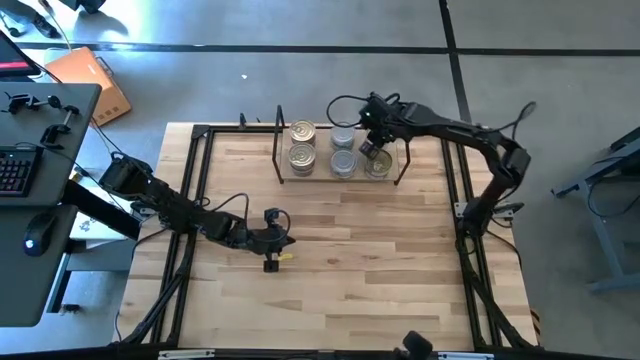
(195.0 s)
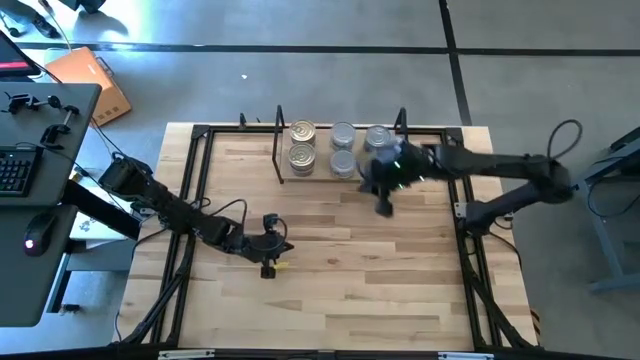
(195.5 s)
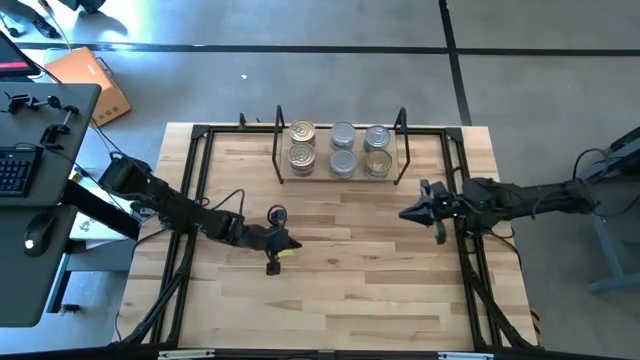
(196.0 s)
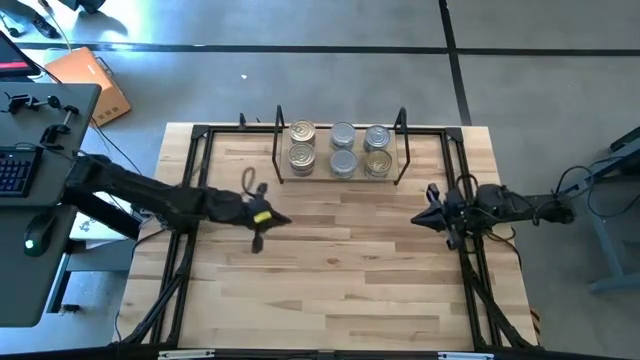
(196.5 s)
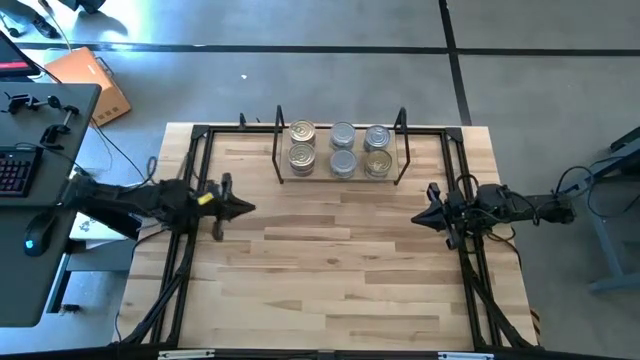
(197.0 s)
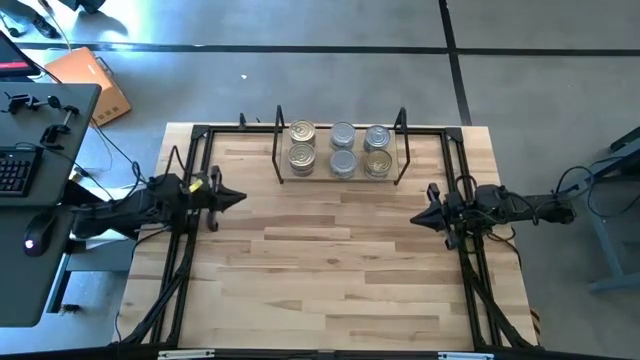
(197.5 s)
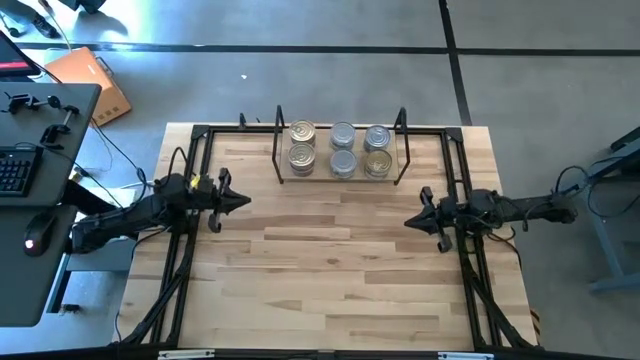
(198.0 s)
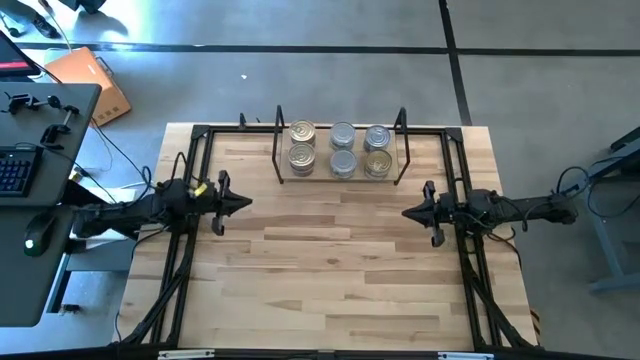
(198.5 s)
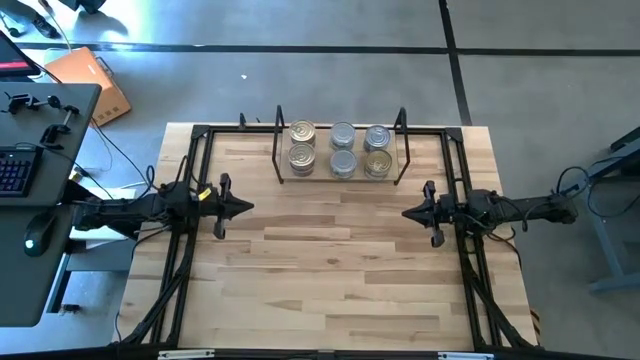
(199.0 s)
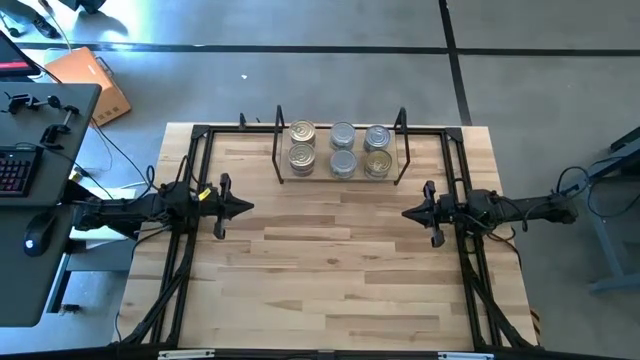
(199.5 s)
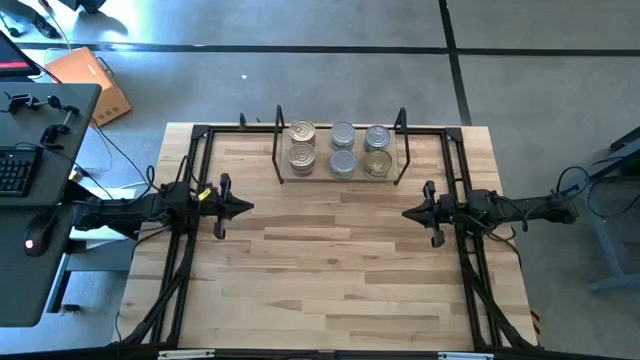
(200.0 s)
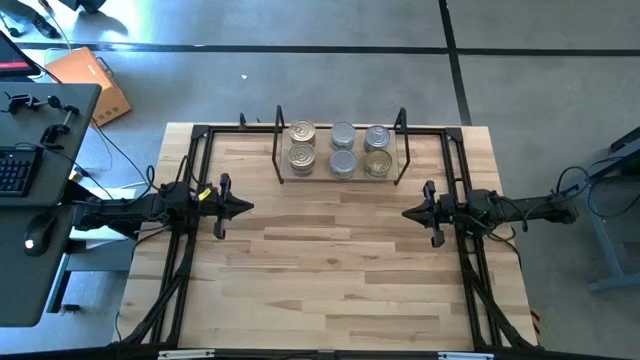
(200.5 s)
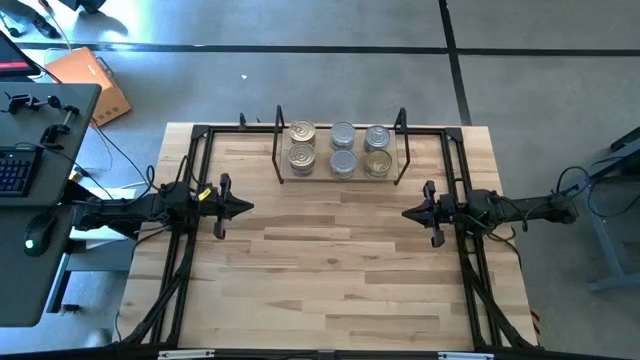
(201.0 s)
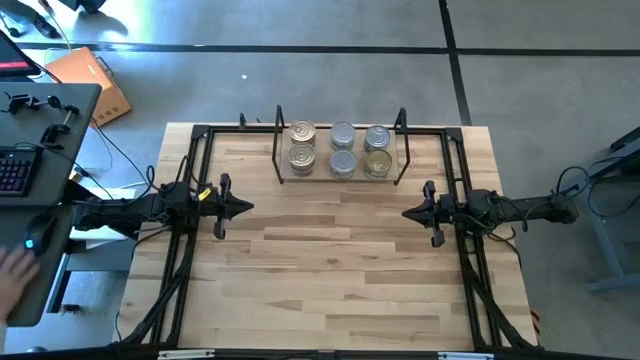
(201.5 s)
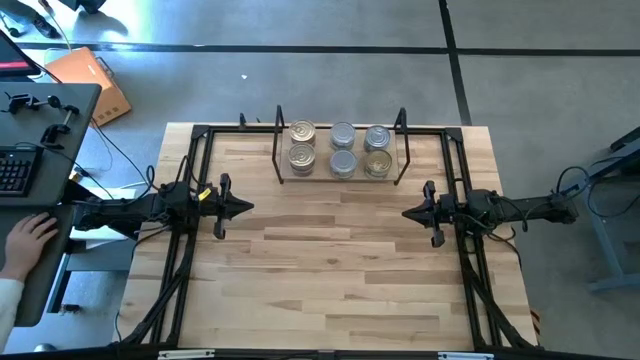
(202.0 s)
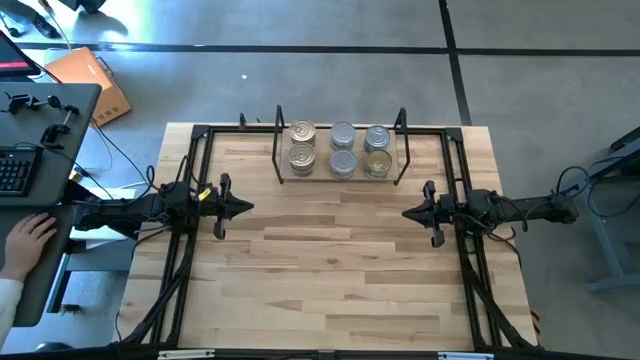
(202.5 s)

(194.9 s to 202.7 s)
Task: Stack canned seafood by type on shelf
Return to Home Position

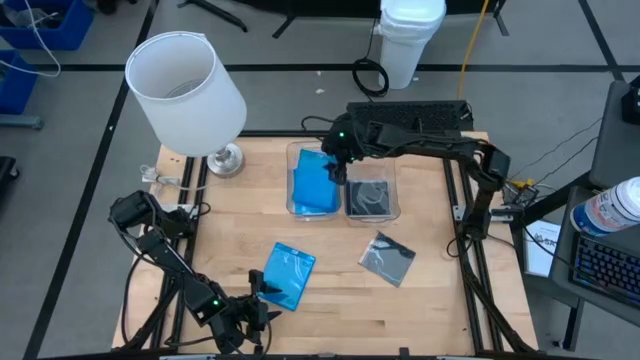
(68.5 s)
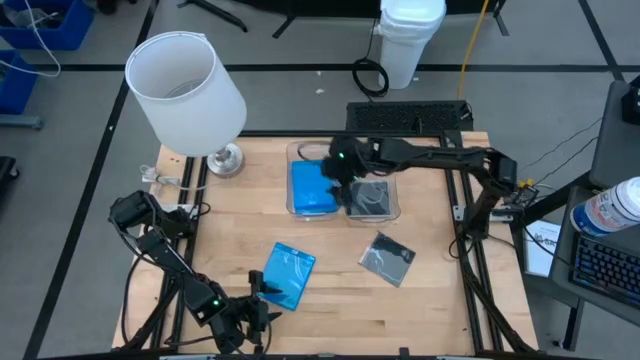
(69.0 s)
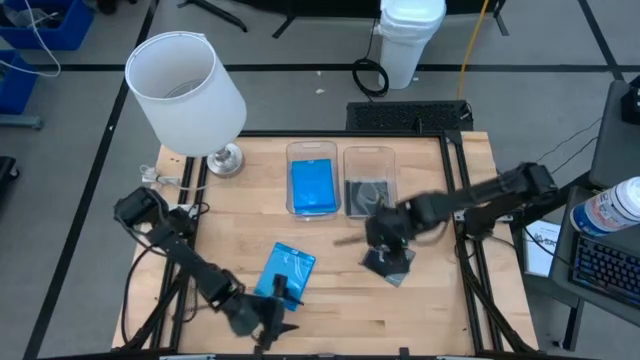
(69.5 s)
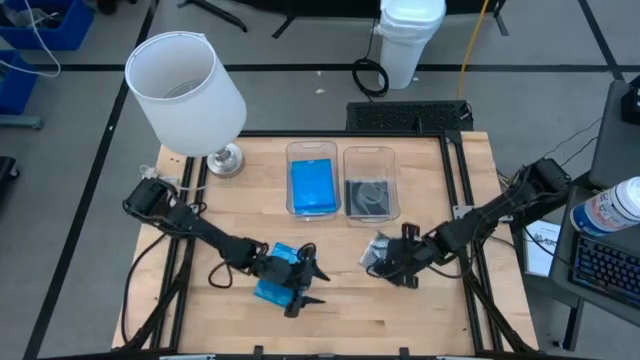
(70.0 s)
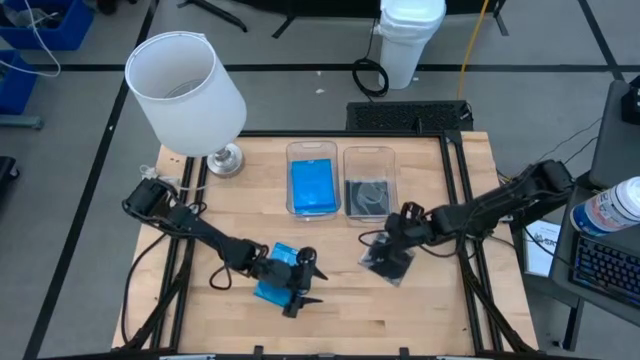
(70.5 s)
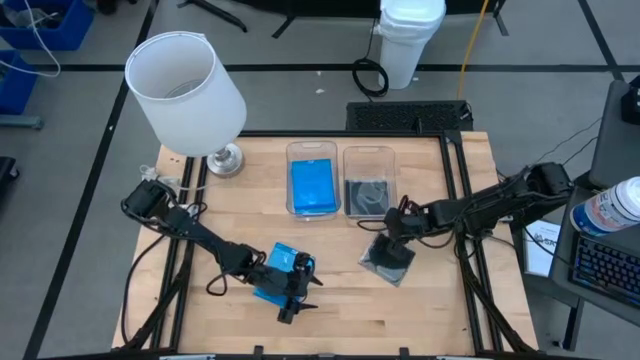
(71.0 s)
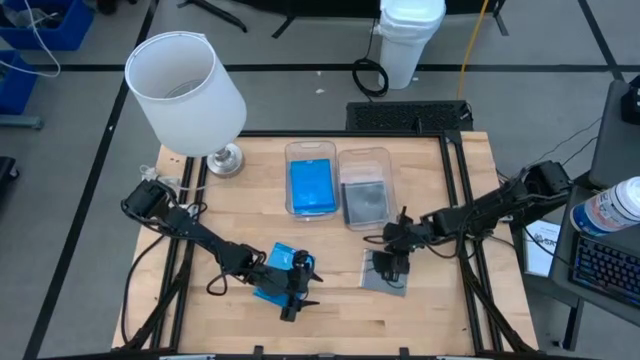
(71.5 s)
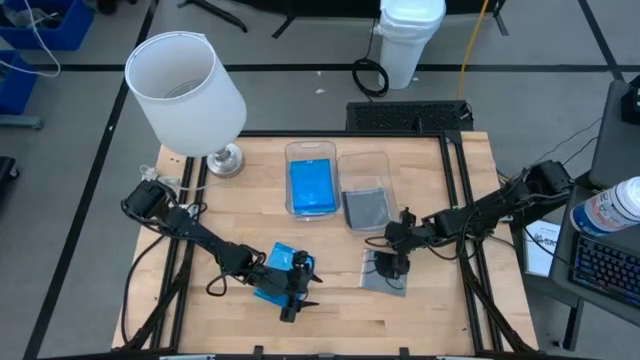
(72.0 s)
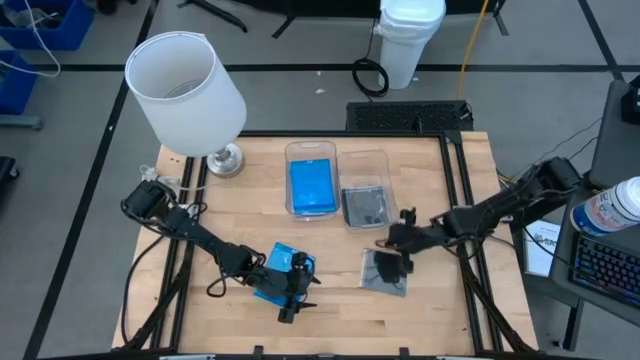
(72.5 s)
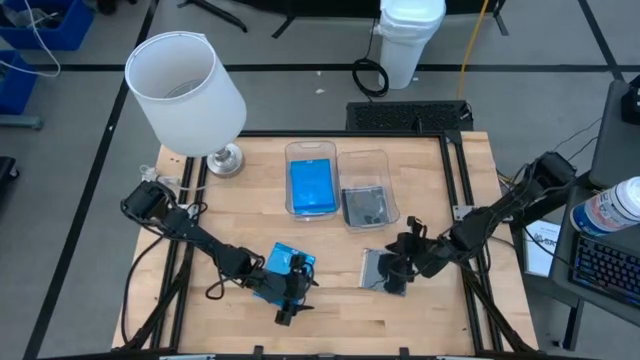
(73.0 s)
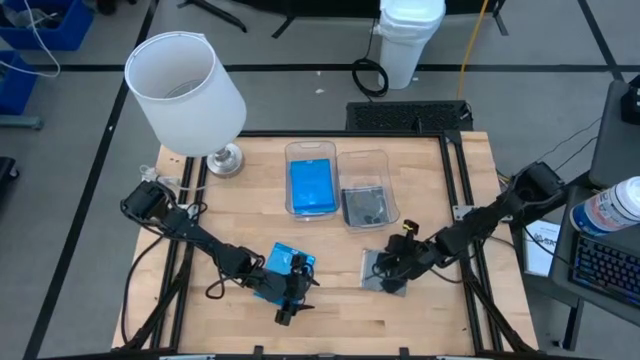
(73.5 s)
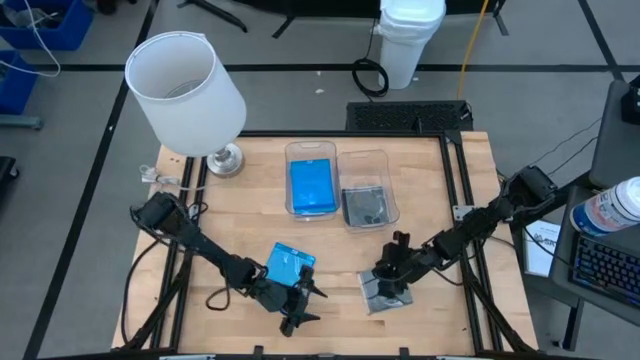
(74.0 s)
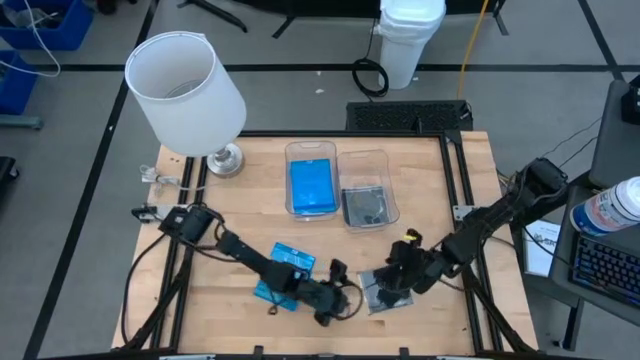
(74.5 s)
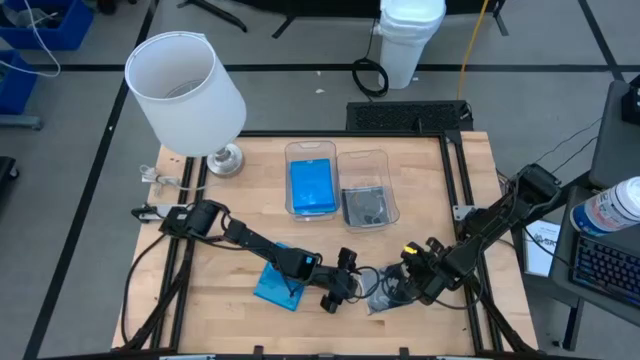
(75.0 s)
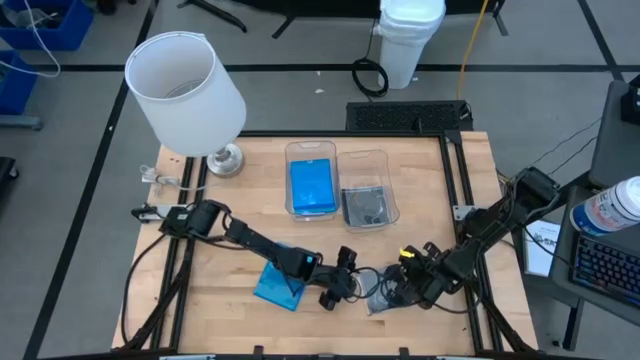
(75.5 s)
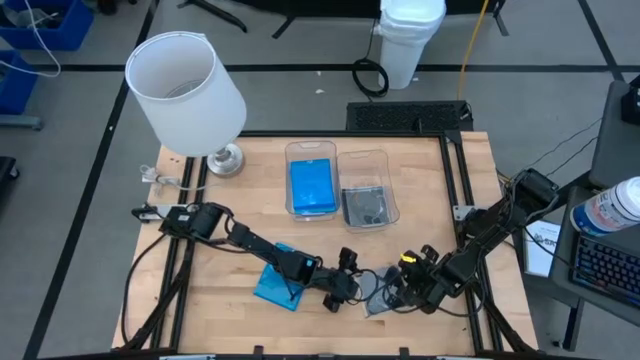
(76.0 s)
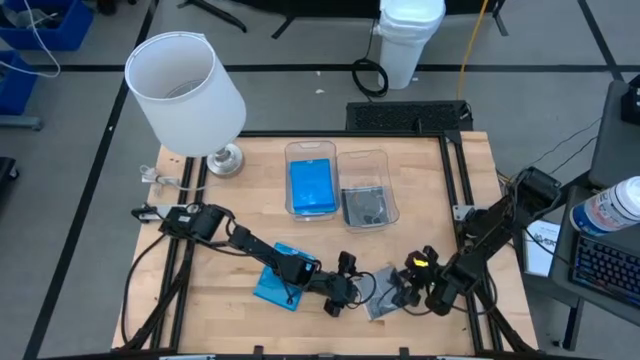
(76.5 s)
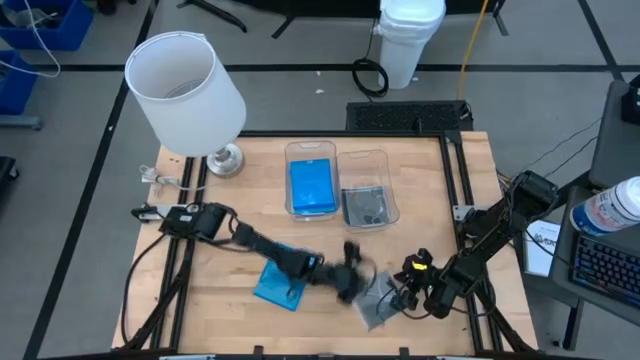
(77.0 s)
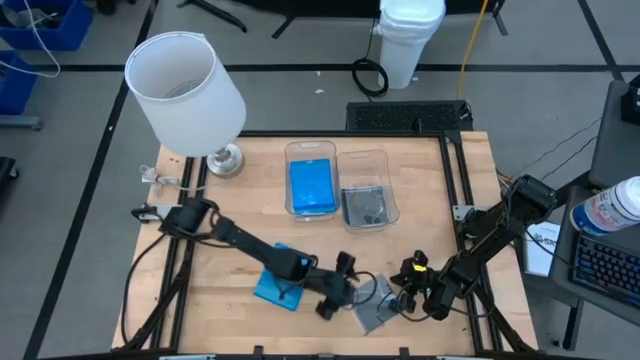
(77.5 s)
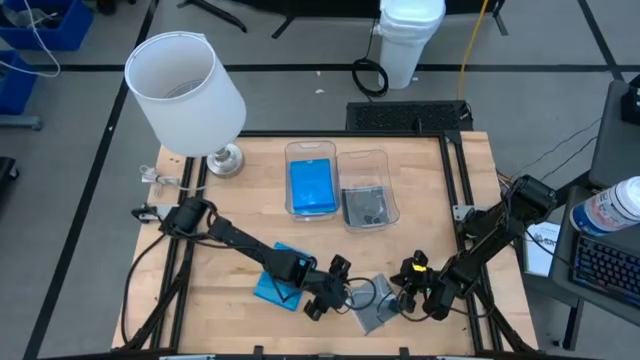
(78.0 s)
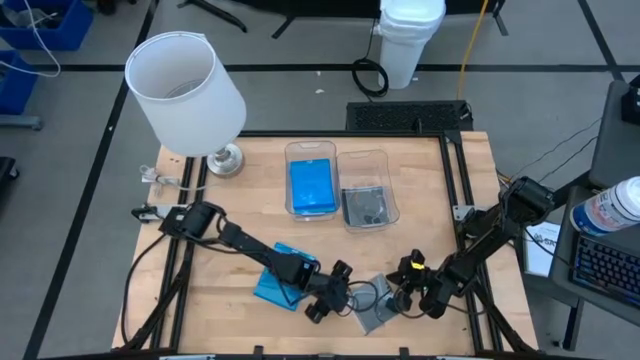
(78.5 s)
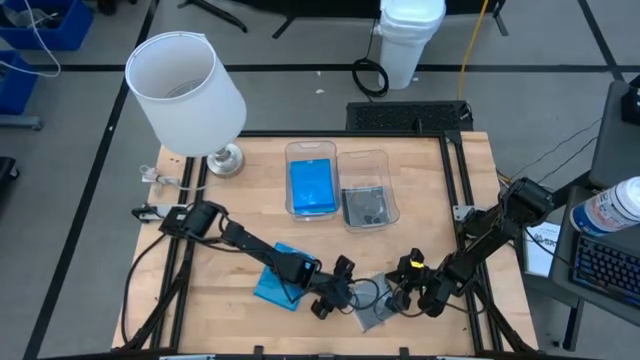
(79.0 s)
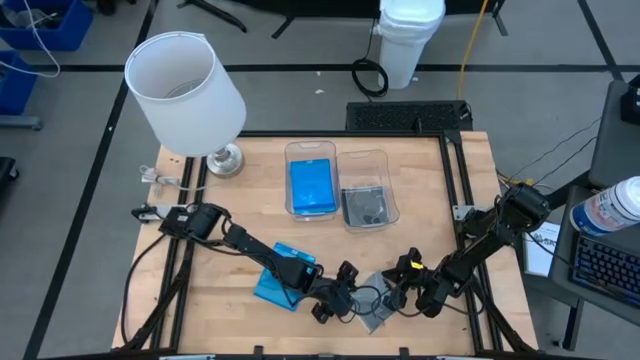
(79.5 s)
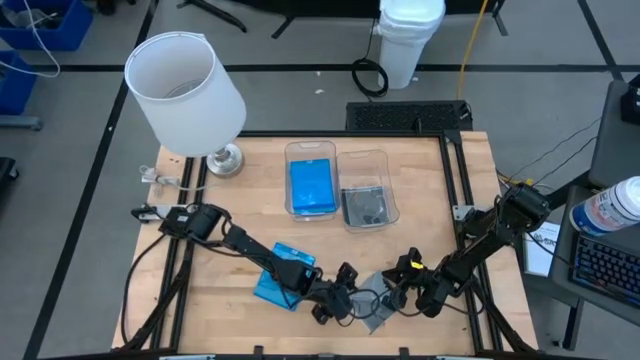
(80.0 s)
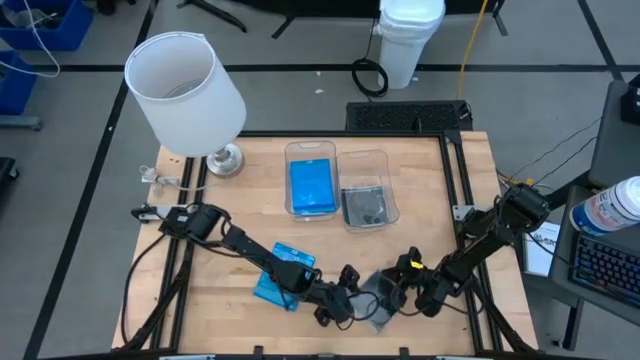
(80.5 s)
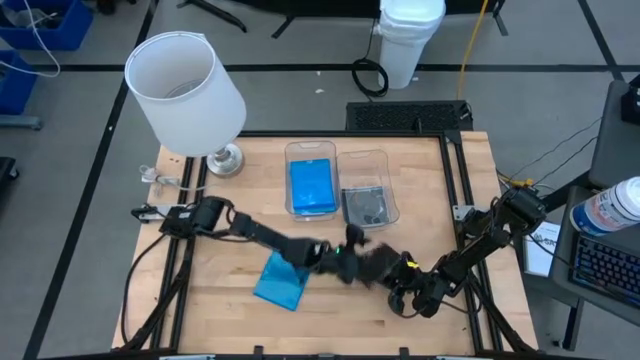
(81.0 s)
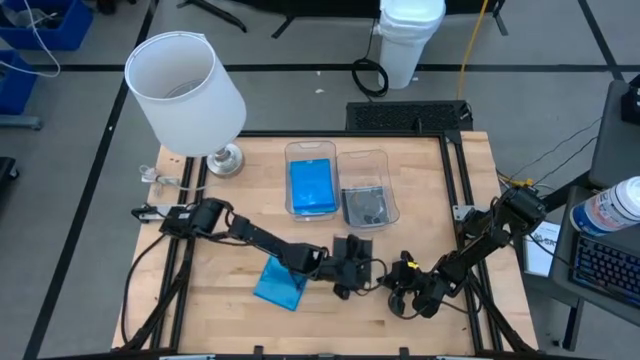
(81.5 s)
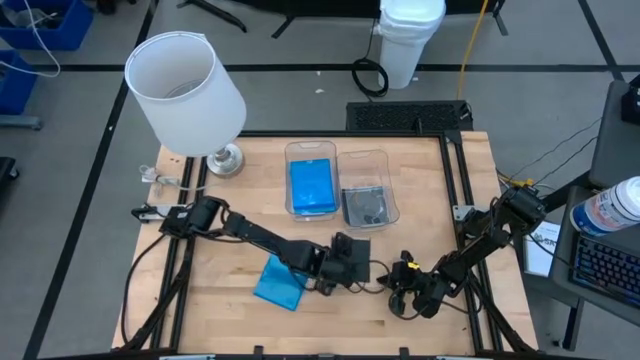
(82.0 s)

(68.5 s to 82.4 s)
Task: Pick & place jewel cases by type
Stack the black CD case on top of the black CD cases in the right transparent bin
